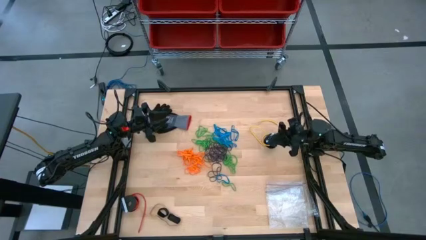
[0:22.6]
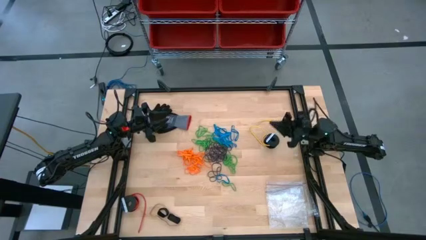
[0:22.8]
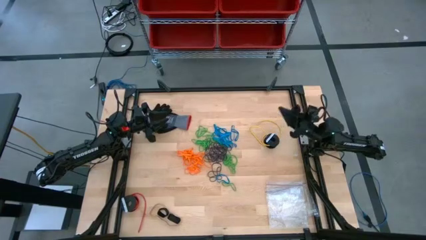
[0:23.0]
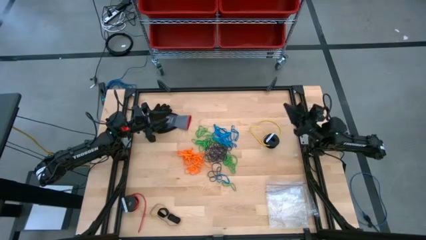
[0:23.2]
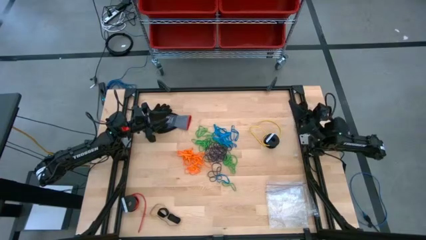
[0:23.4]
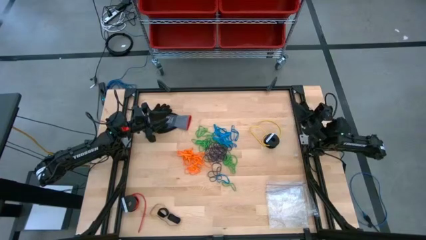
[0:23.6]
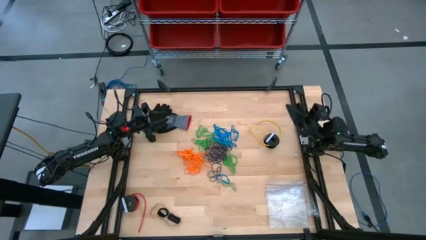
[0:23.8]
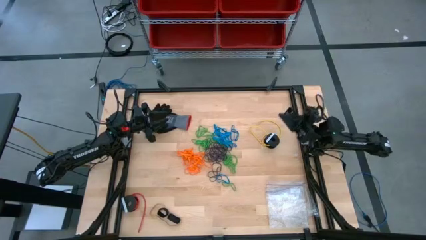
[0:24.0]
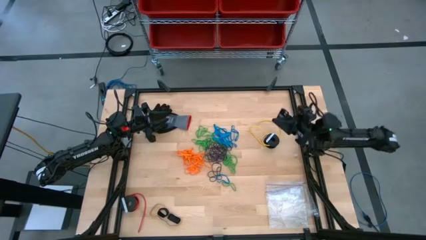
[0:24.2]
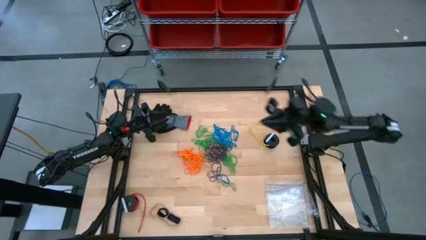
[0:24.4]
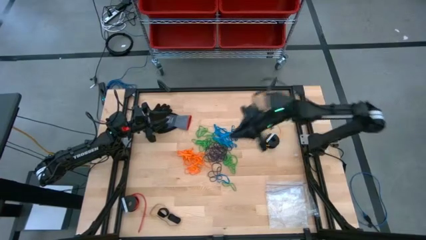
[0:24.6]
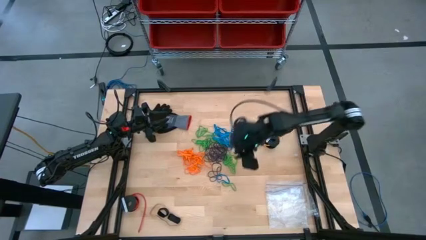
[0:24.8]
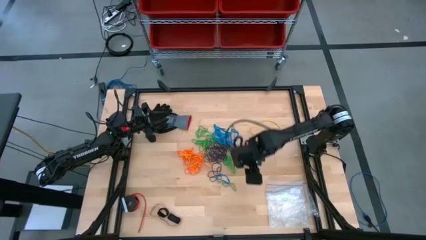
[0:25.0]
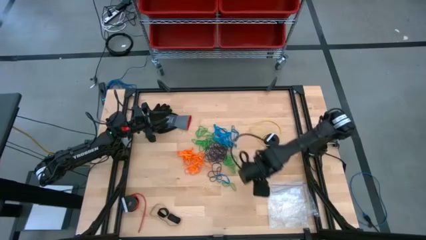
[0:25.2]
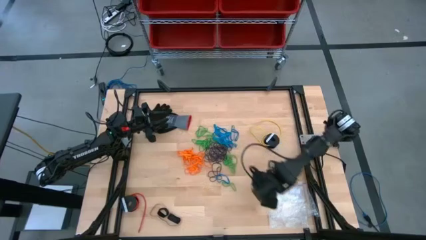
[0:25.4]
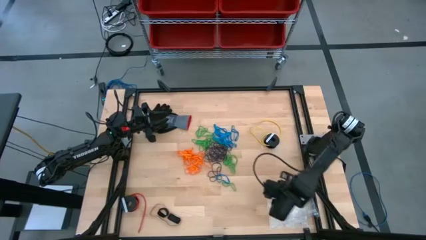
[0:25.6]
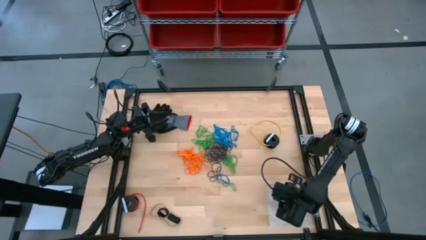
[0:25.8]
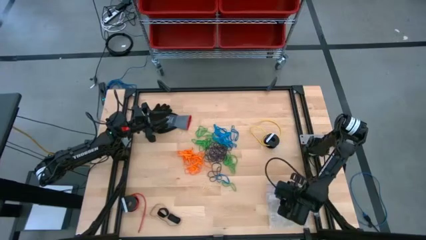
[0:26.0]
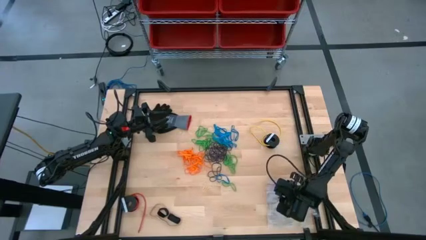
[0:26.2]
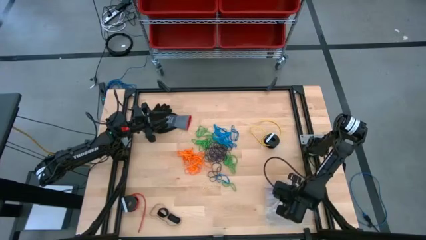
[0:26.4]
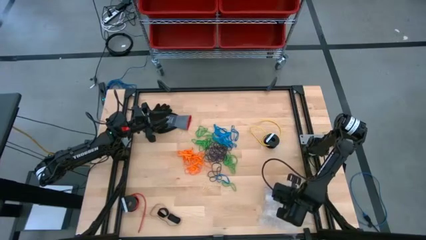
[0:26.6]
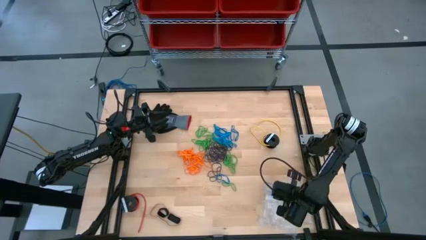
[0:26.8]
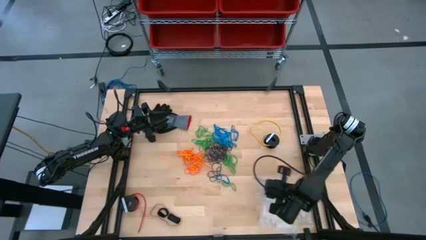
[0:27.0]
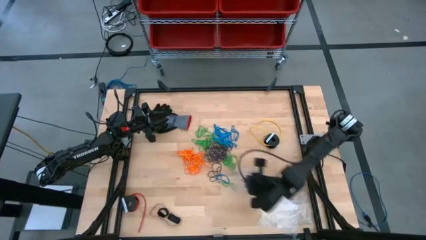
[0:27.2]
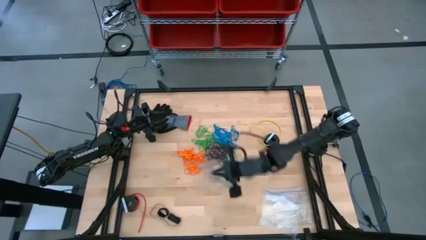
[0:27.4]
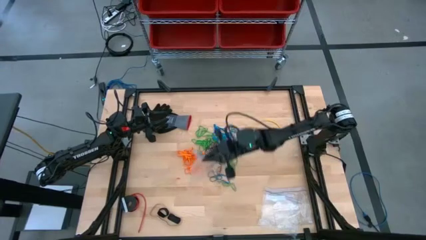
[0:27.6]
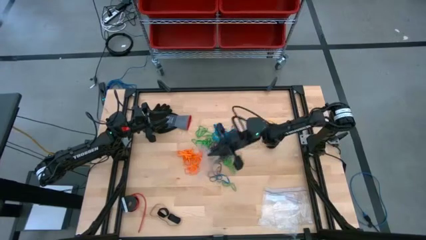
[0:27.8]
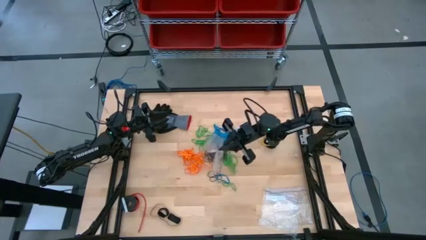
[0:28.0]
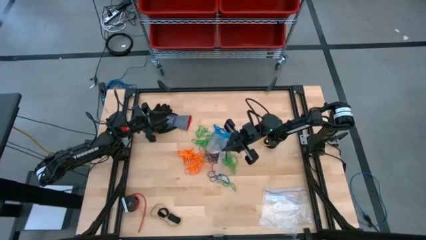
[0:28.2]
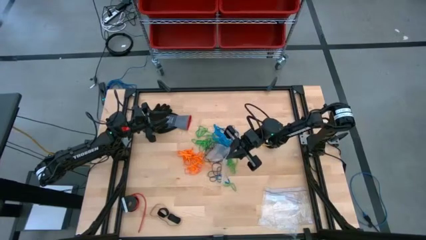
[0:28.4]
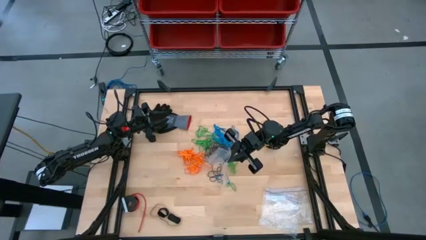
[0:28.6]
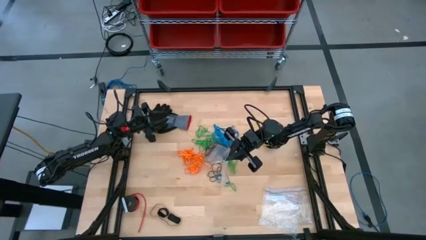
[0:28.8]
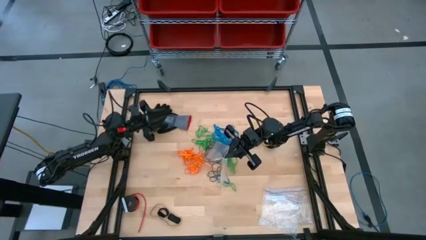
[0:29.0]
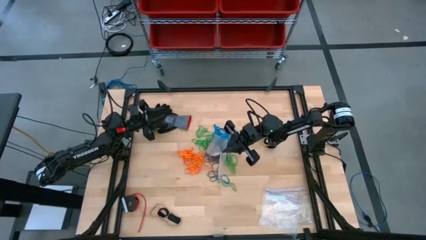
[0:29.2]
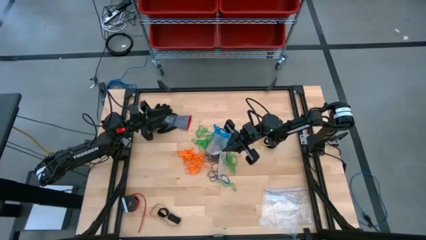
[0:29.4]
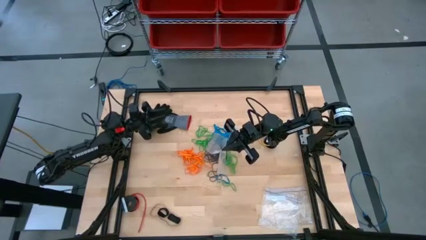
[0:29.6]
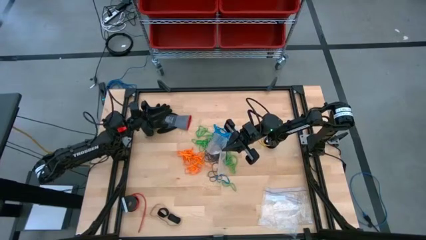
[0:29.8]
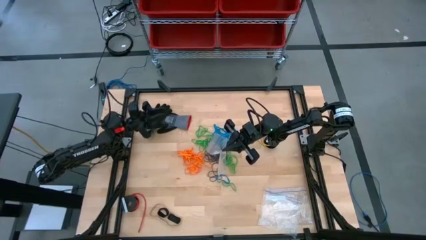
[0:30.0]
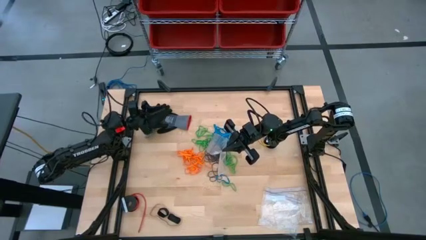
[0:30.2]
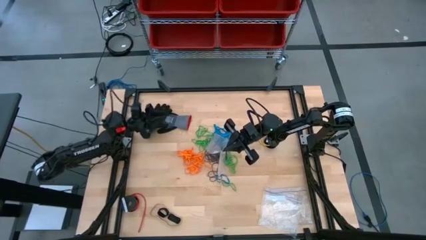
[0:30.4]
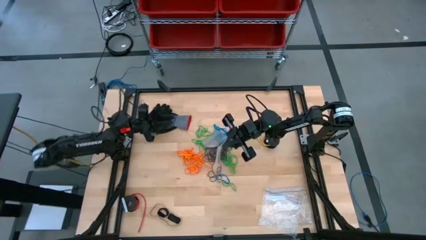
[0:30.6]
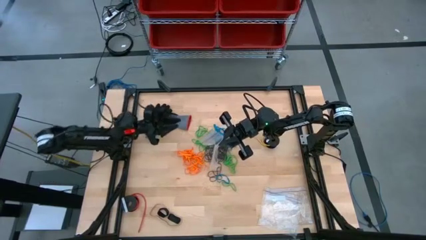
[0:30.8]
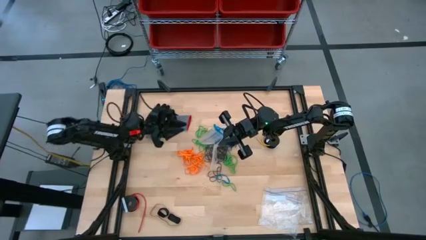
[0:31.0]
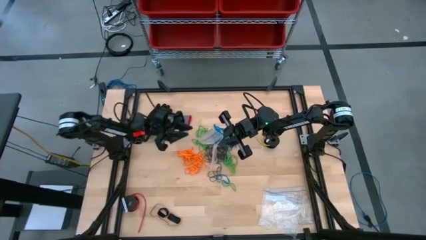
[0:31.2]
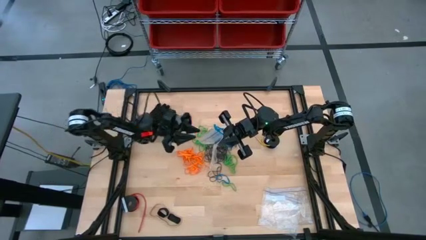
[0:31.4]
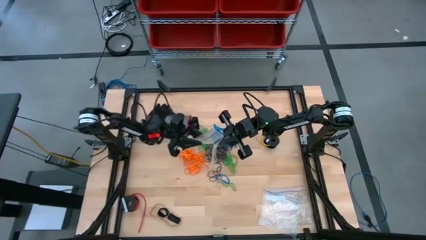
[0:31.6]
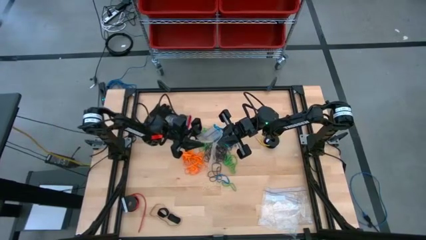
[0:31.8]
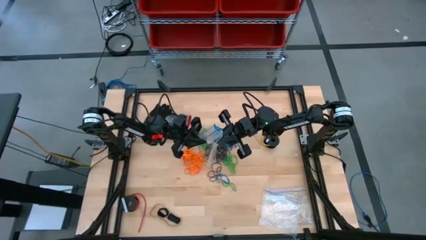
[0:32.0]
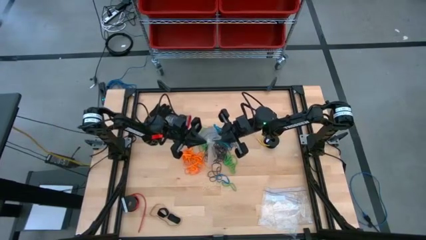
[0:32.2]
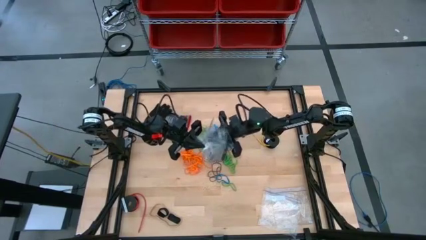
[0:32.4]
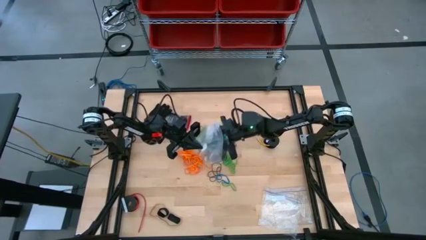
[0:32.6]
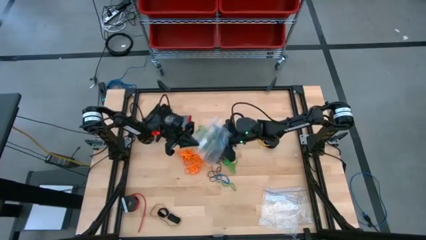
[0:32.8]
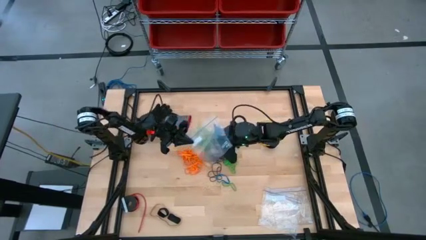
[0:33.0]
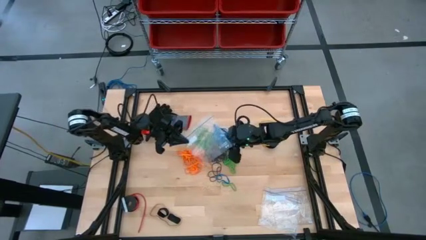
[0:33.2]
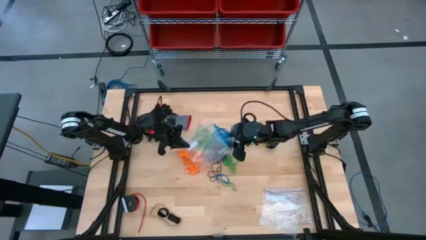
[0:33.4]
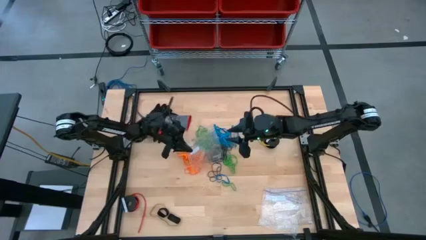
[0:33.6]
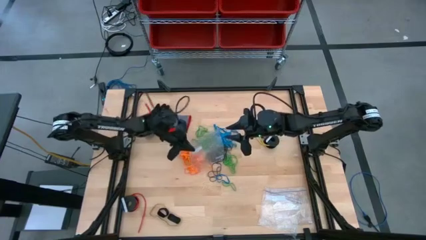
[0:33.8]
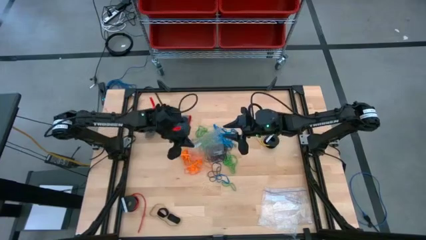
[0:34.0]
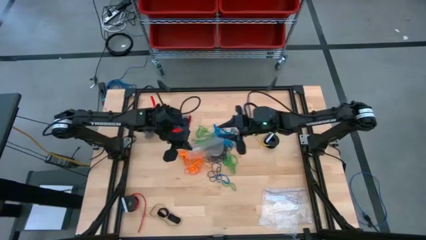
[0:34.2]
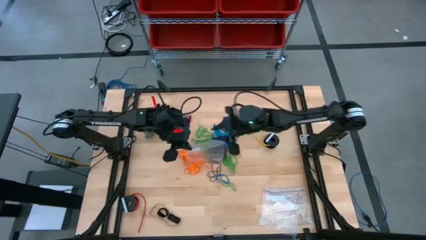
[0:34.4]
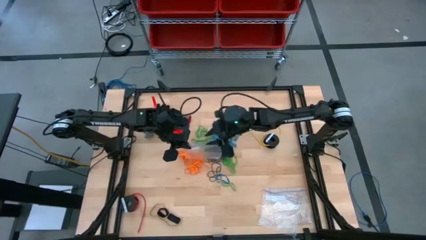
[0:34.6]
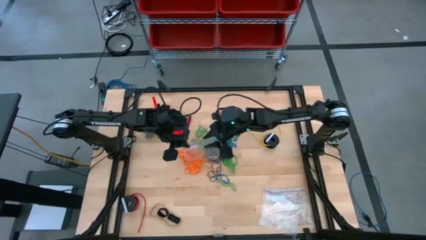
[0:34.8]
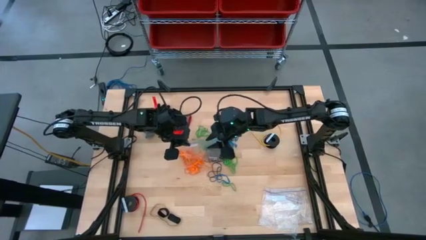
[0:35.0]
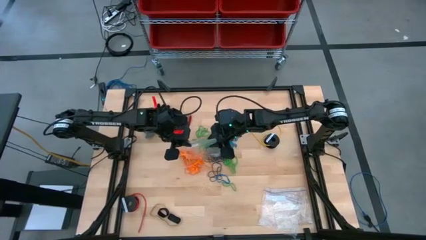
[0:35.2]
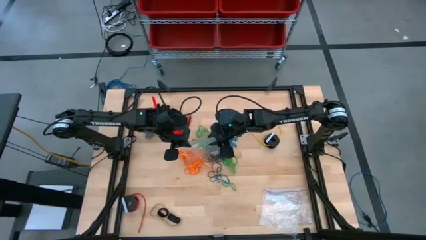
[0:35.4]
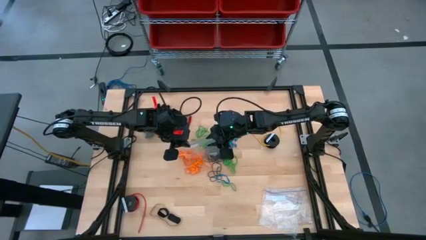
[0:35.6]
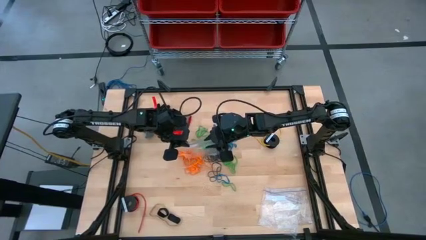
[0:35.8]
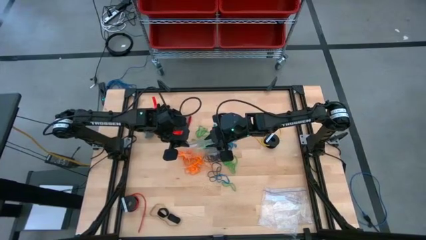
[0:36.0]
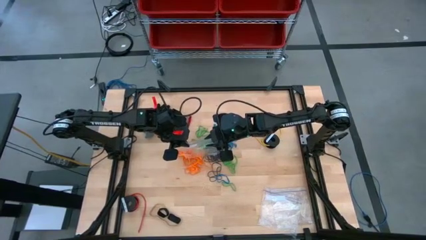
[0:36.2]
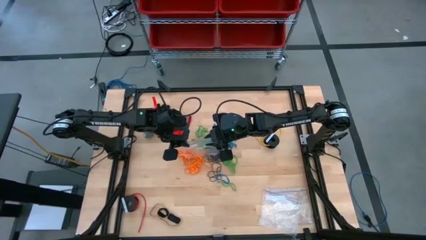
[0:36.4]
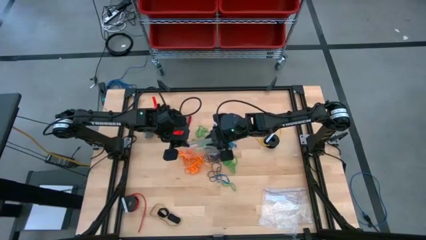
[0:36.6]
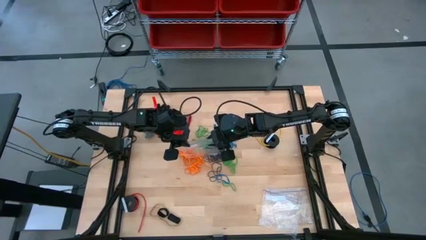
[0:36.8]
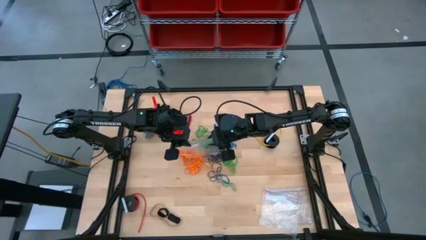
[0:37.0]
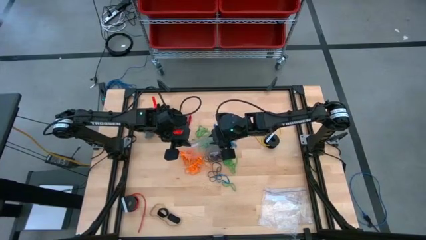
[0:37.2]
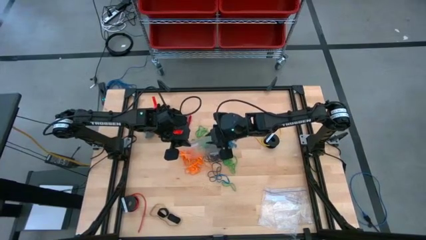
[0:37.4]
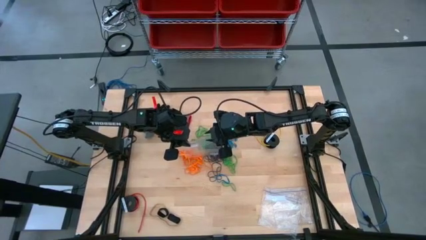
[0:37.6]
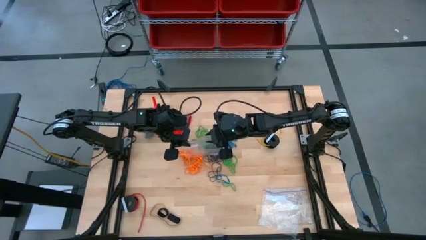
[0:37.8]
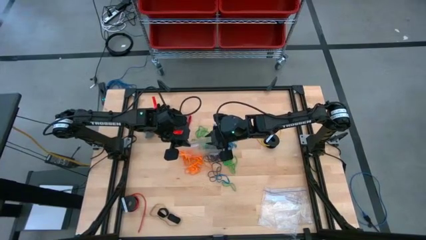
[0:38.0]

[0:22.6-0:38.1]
Task: Sort rubber bands
Open the transparent zip bag
